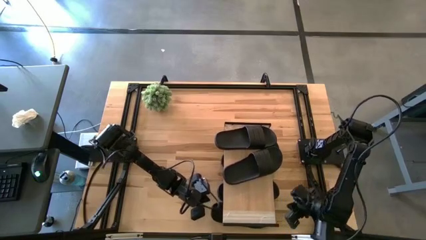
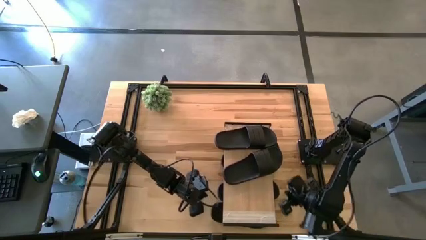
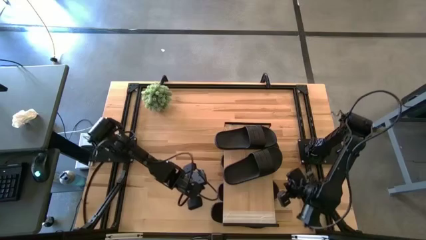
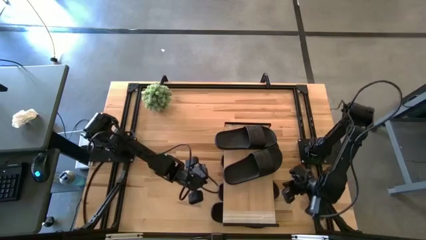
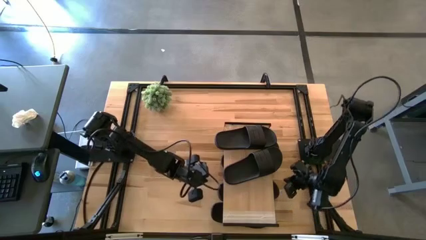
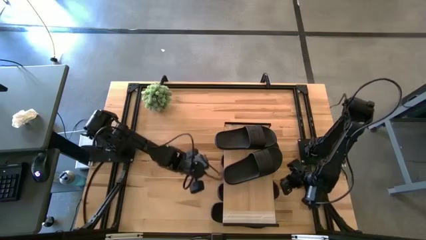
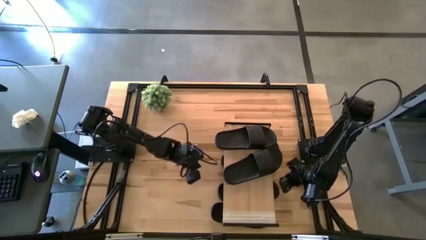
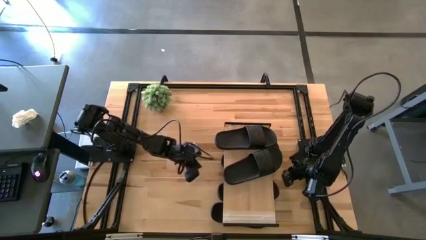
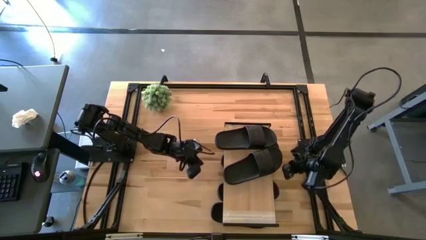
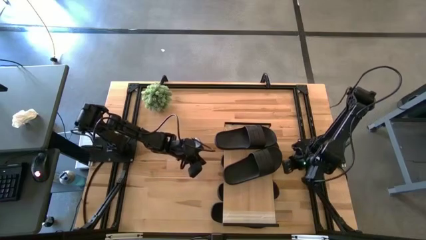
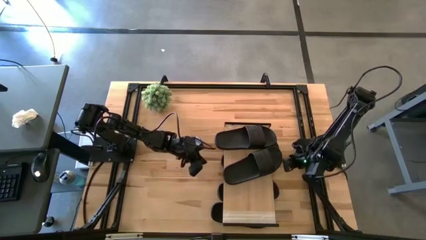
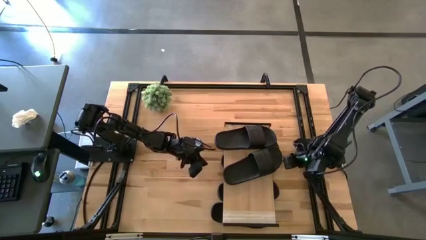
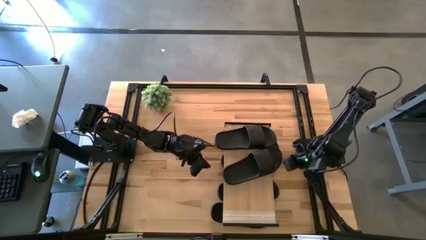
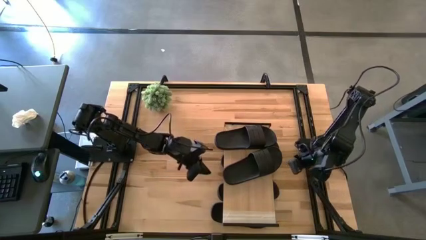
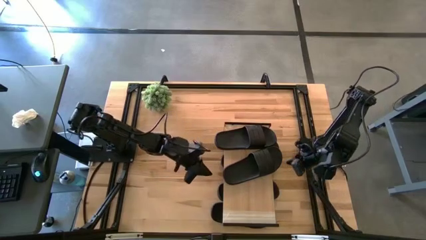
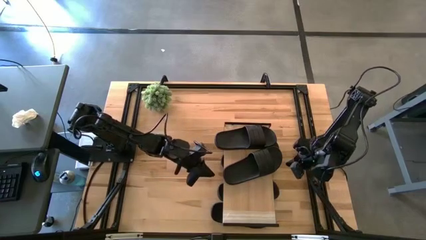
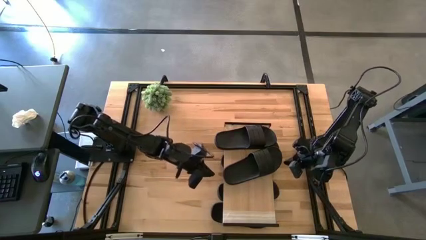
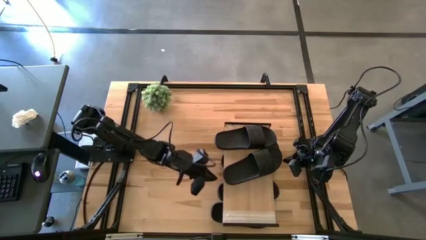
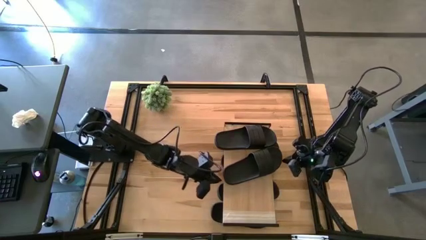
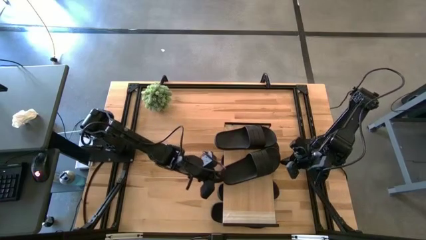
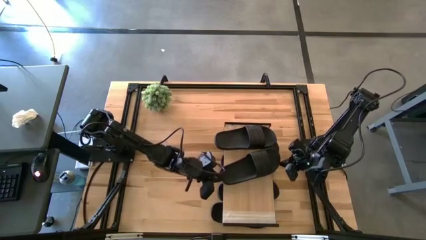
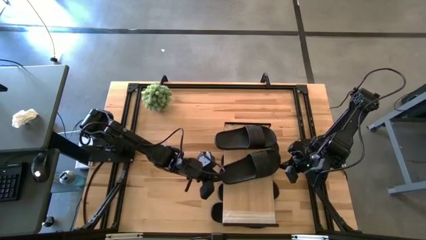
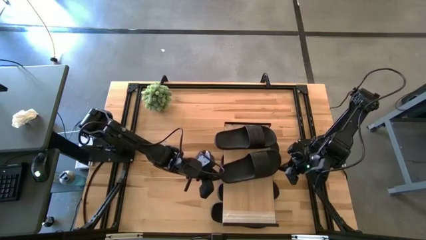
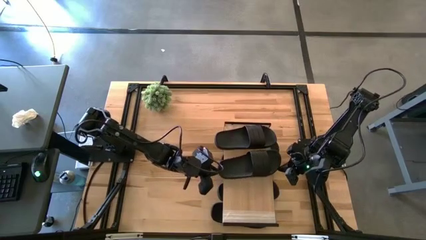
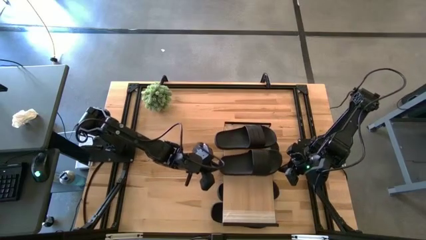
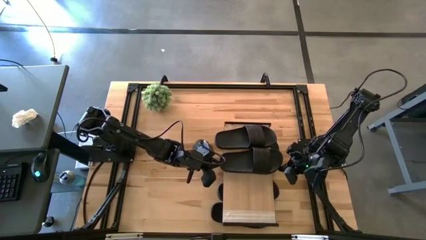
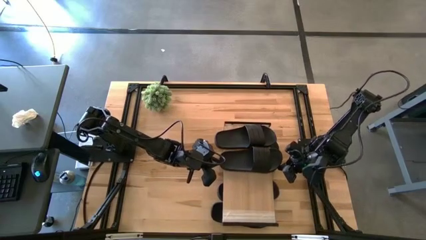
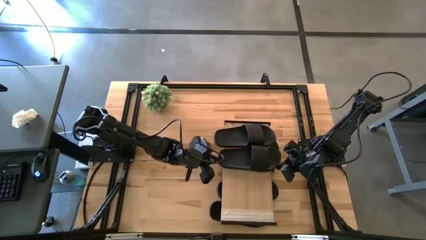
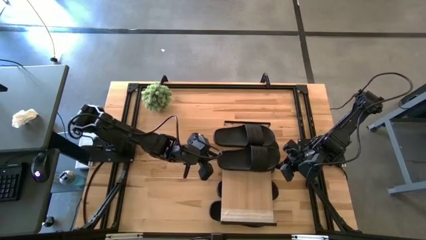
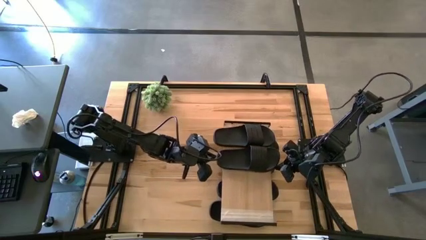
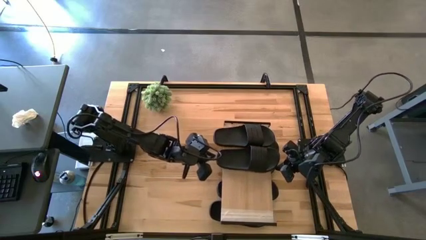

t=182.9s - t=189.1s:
Task: Pick and place slides into the shelf
Adjust the black slide on the shelf

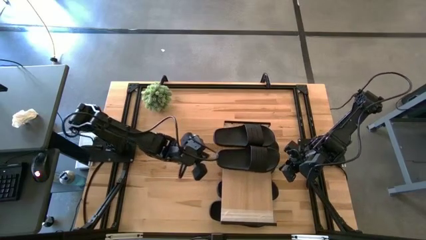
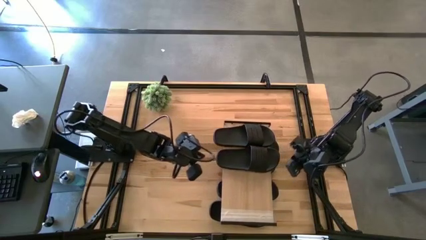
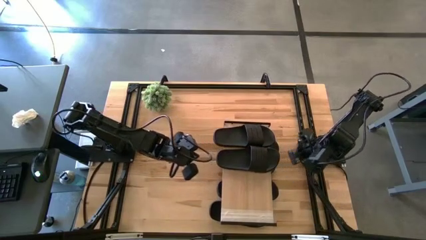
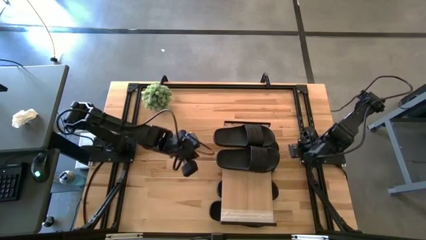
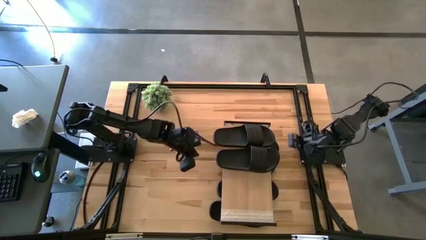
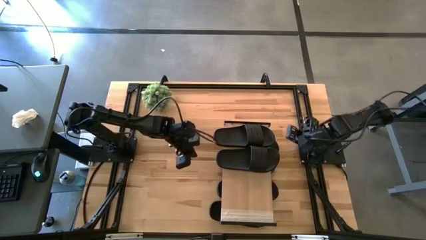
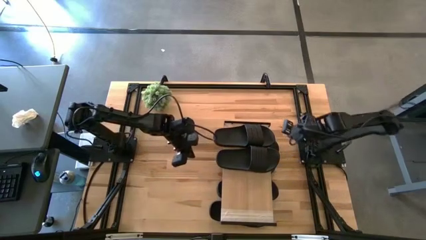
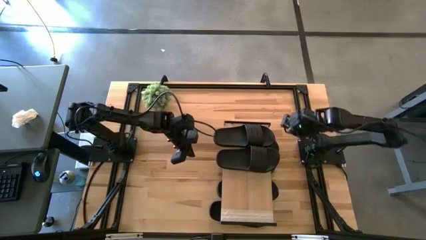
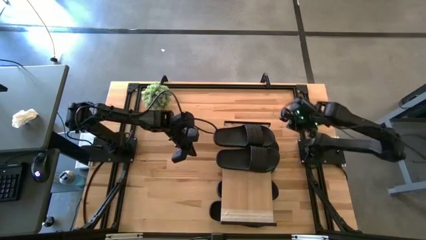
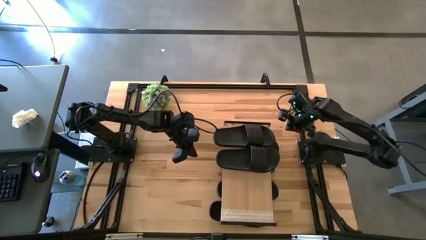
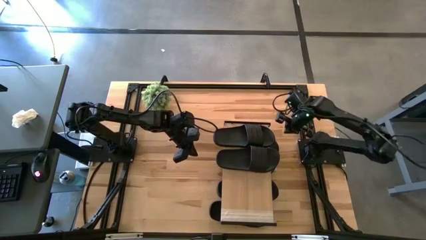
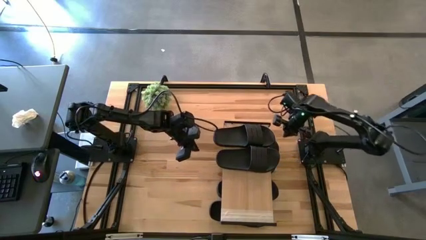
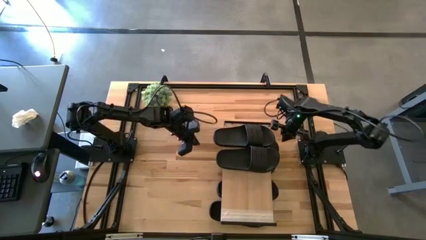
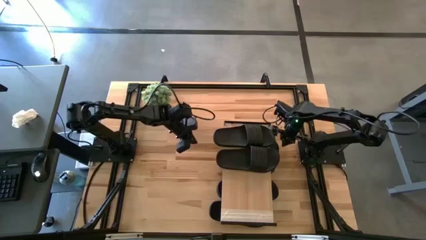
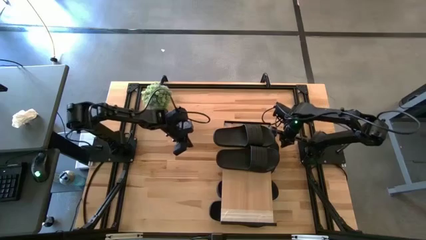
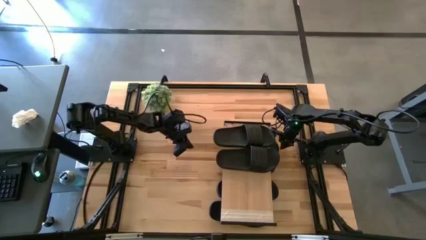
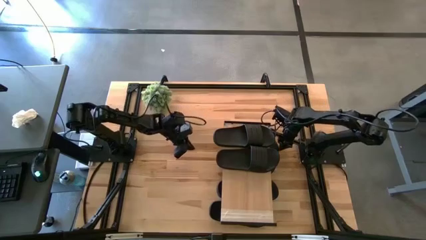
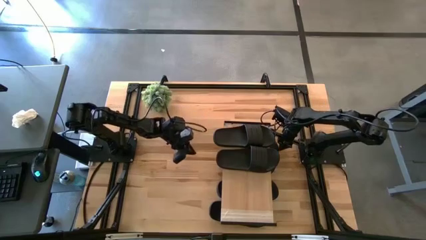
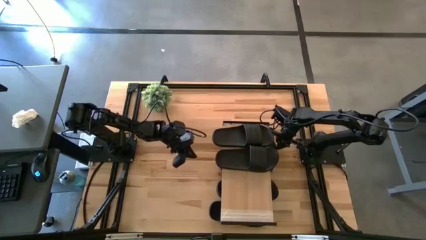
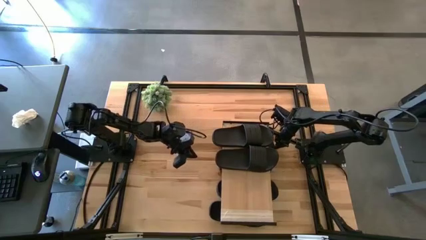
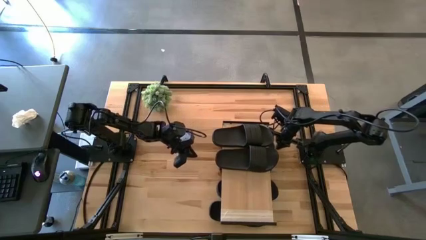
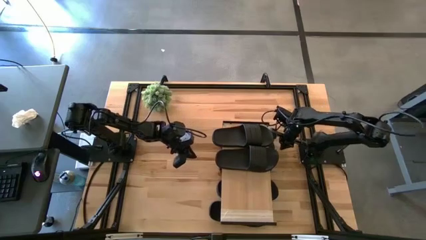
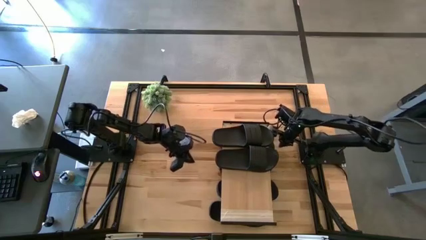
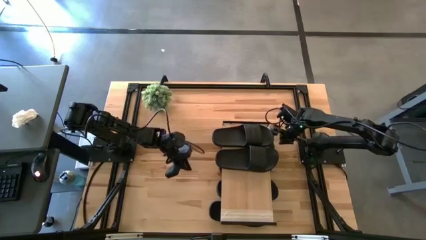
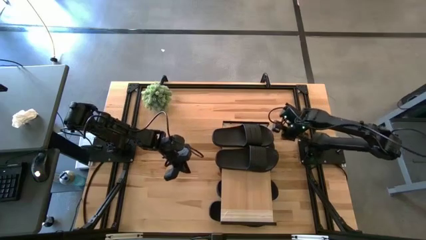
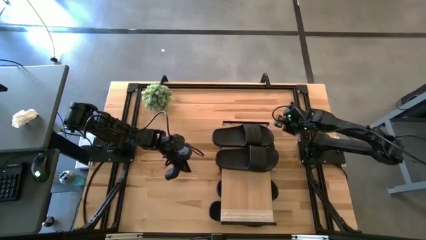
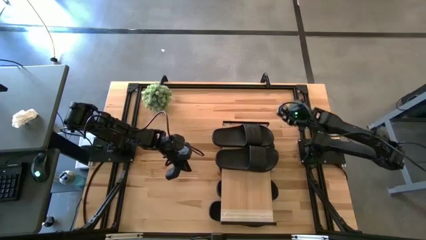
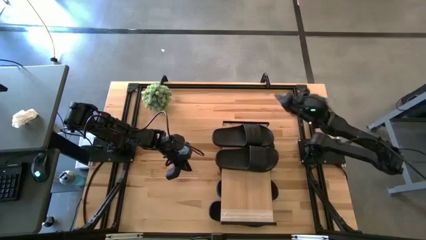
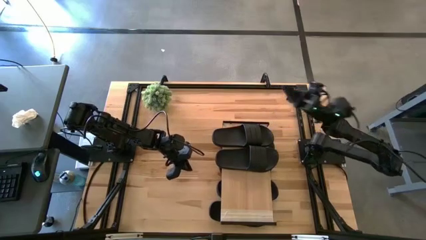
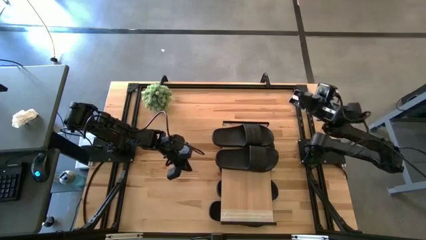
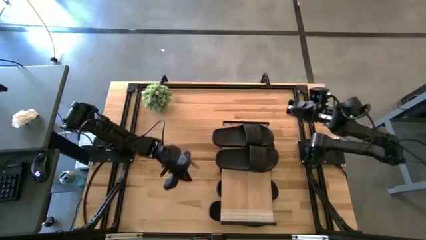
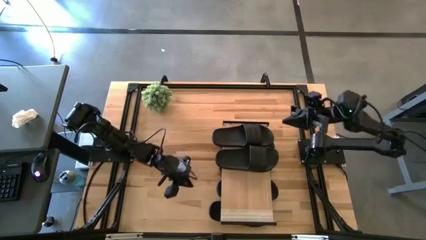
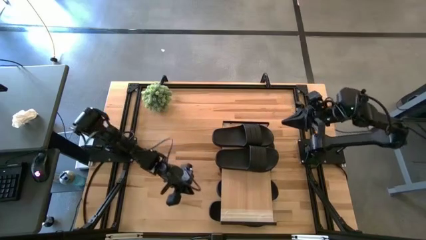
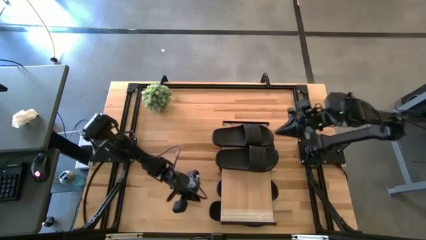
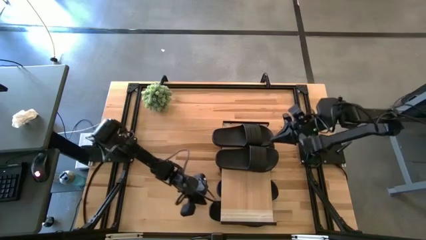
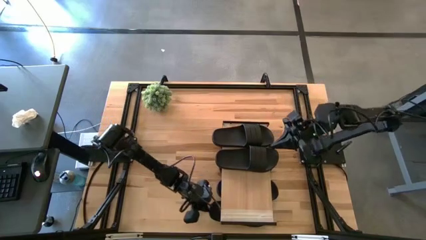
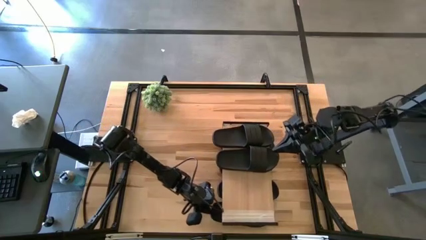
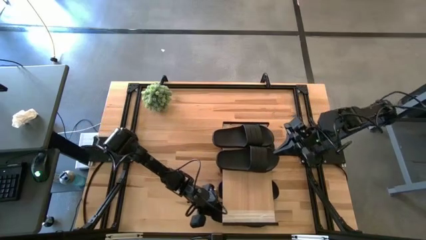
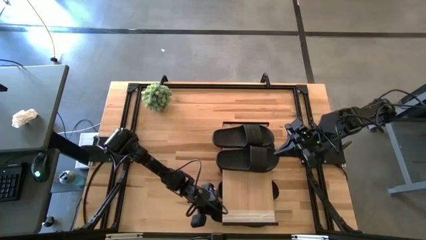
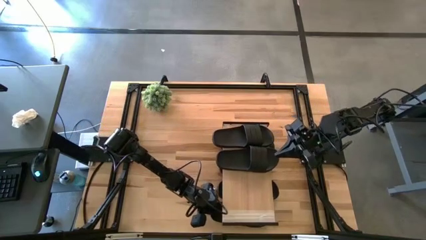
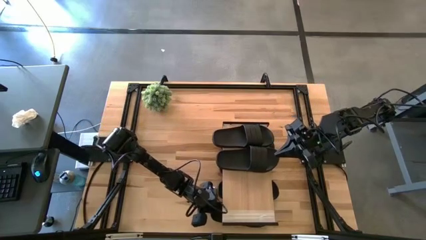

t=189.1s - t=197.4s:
Adjust the black slides under the shelf

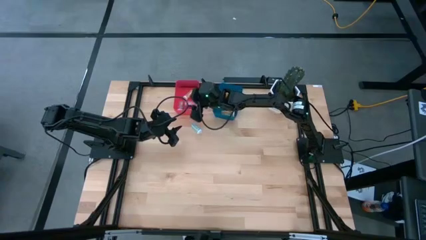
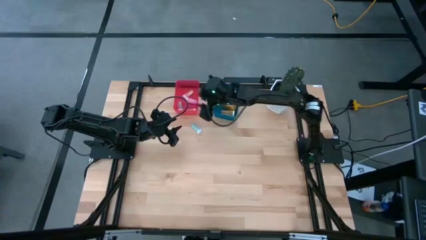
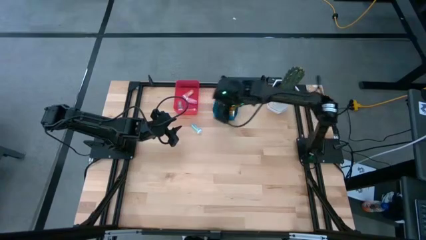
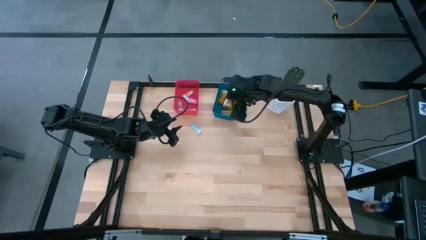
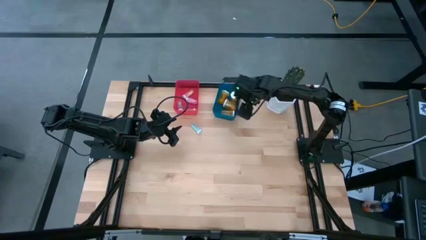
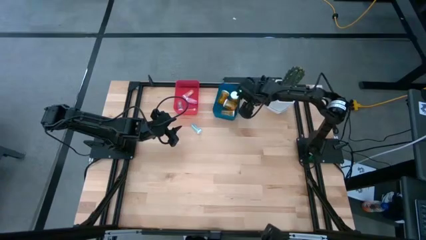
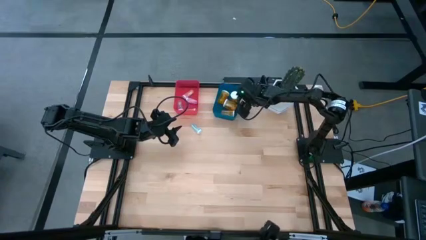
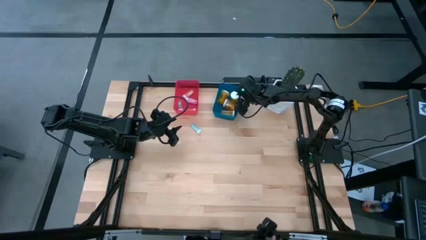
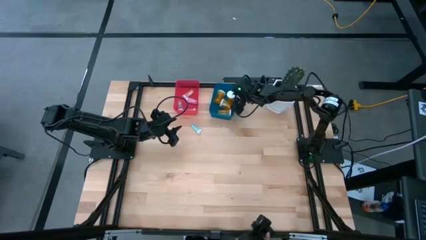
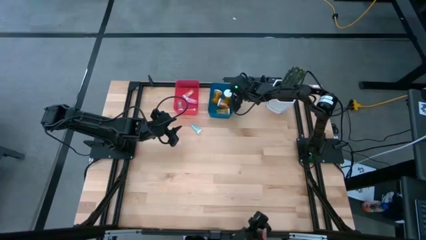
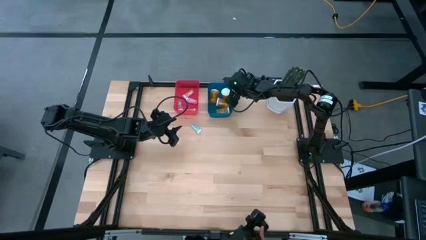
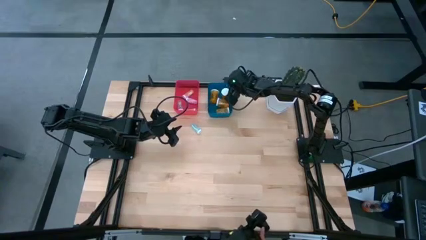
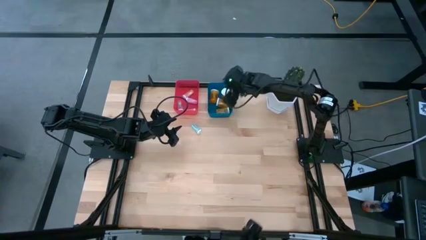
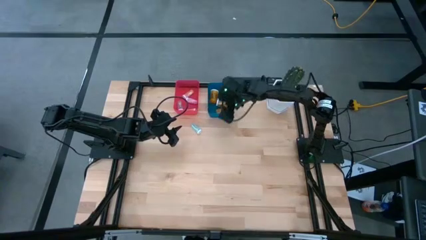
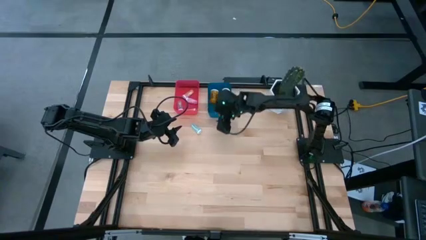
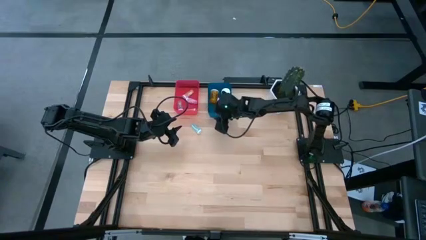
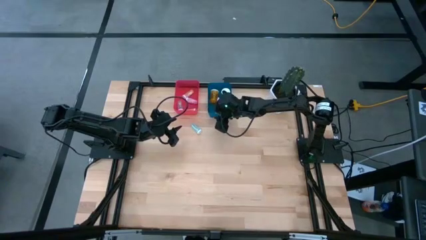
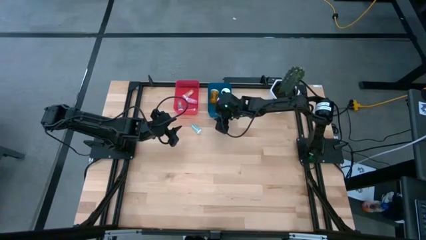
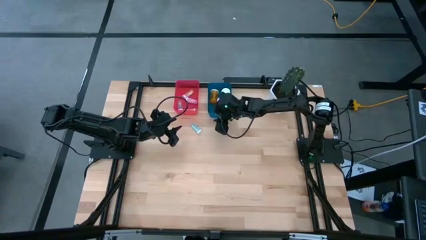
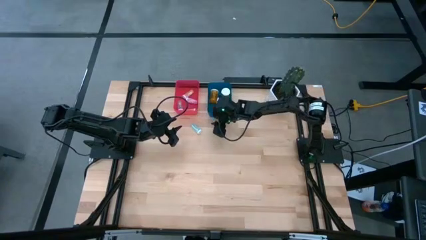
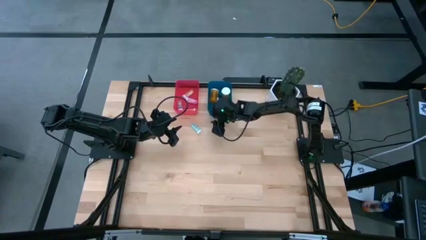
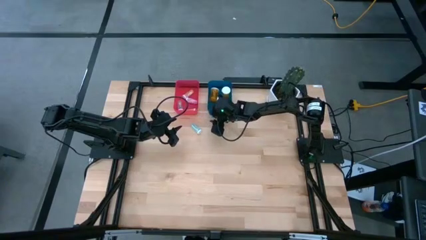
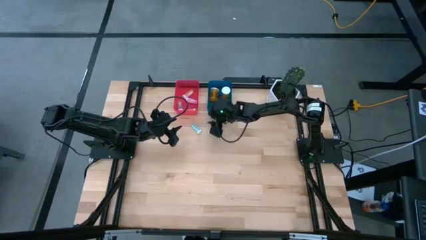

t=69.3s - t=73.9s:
Task: Pick and place medicine bottles into bin by pill shape (circle, oval)
Adjust the blue bin
